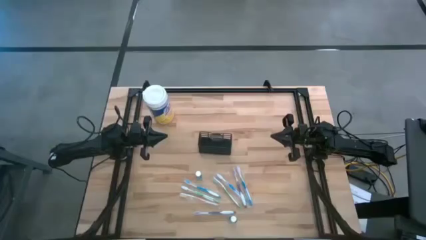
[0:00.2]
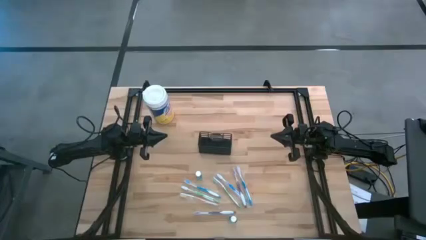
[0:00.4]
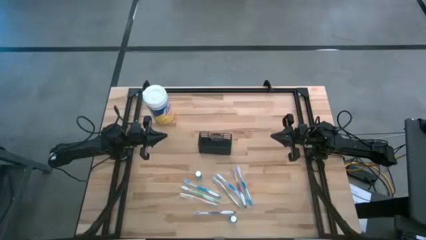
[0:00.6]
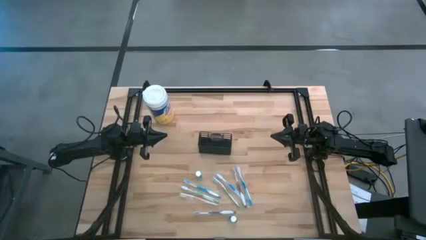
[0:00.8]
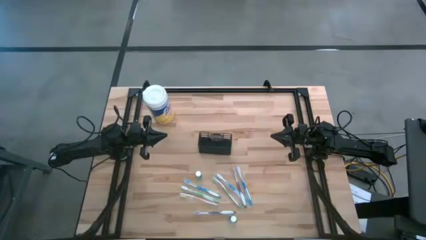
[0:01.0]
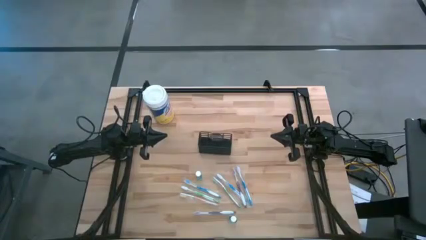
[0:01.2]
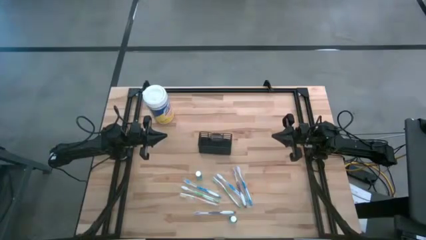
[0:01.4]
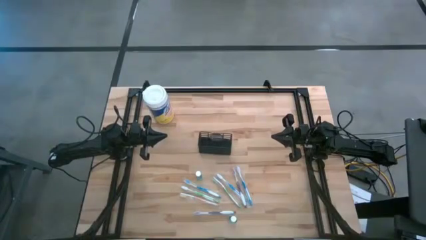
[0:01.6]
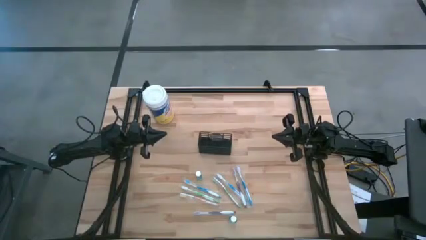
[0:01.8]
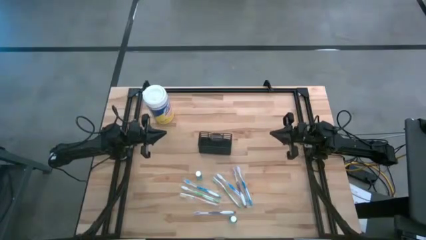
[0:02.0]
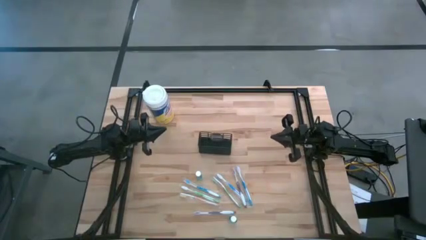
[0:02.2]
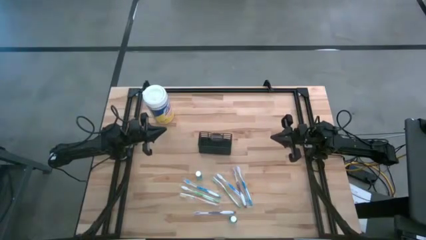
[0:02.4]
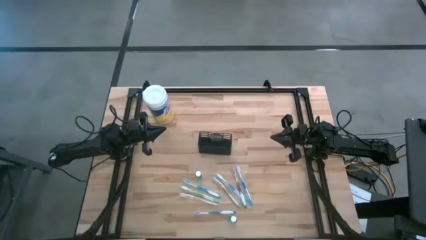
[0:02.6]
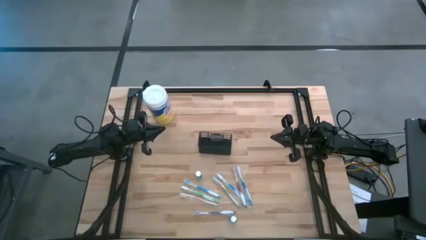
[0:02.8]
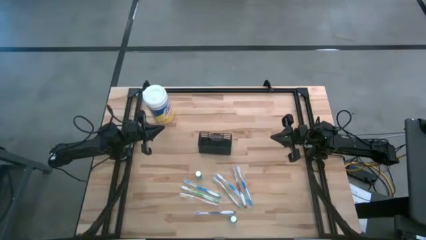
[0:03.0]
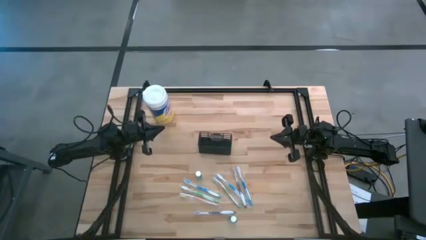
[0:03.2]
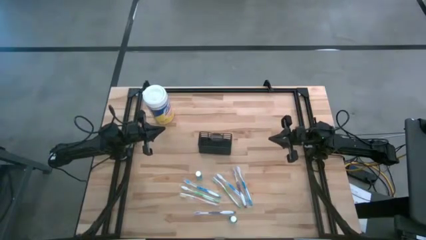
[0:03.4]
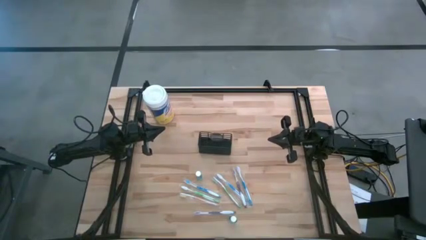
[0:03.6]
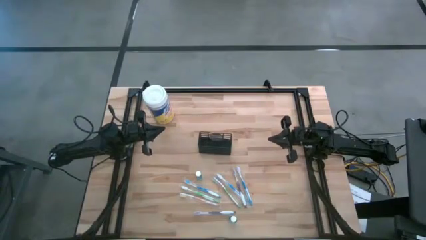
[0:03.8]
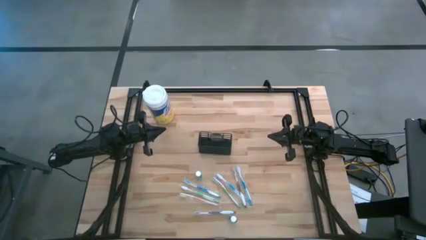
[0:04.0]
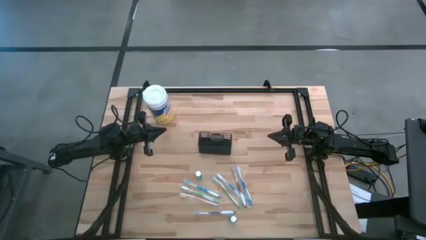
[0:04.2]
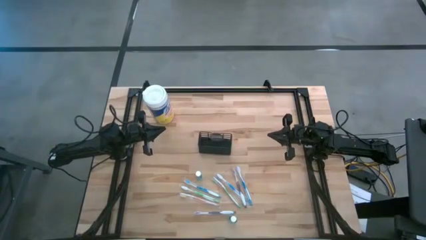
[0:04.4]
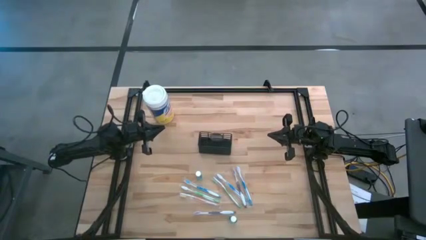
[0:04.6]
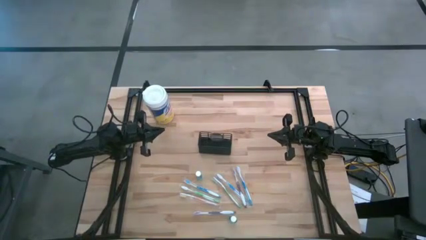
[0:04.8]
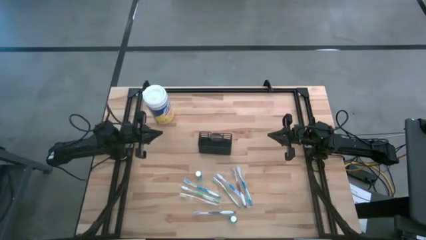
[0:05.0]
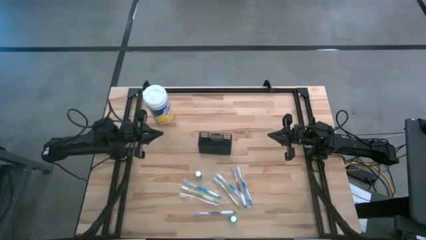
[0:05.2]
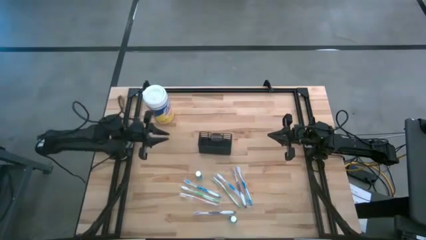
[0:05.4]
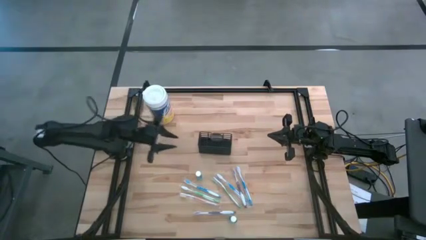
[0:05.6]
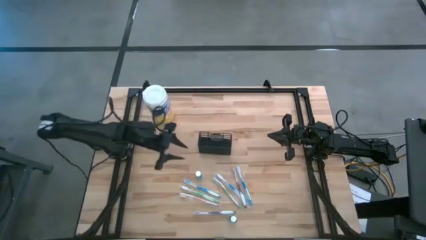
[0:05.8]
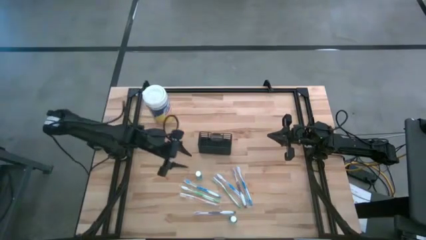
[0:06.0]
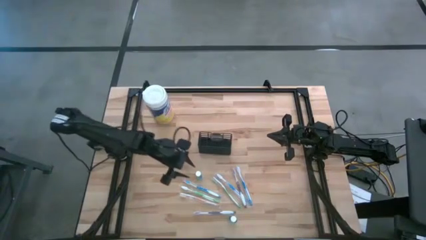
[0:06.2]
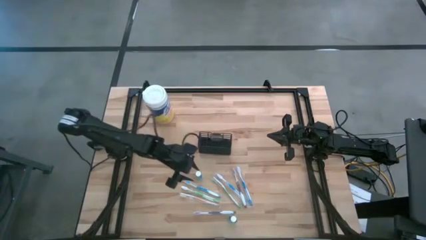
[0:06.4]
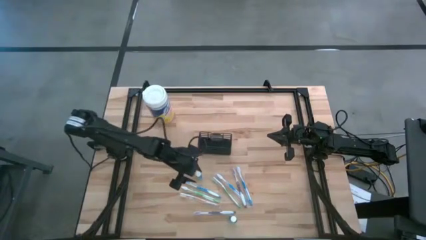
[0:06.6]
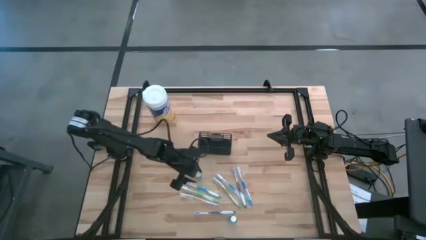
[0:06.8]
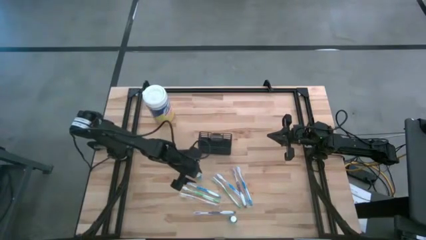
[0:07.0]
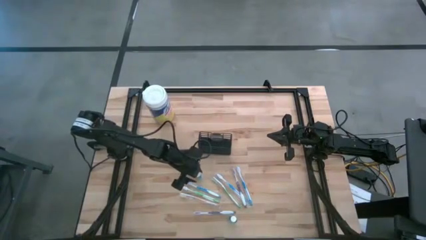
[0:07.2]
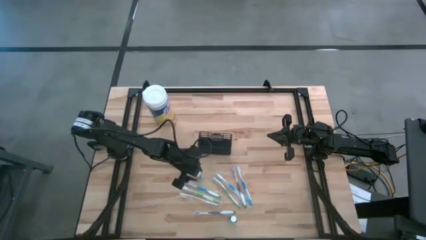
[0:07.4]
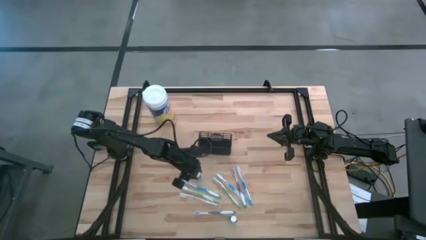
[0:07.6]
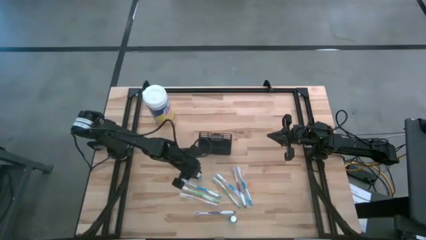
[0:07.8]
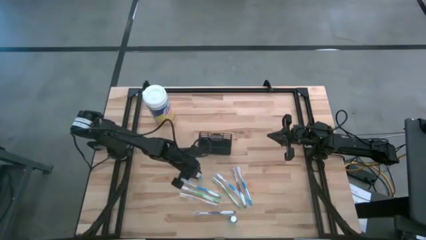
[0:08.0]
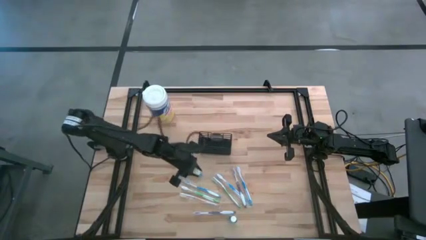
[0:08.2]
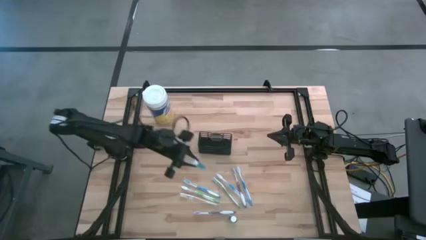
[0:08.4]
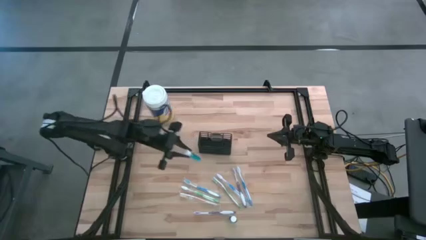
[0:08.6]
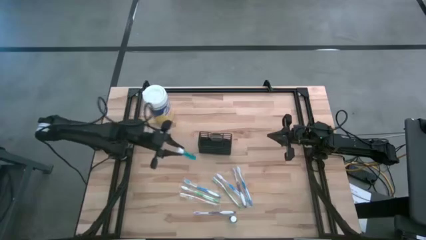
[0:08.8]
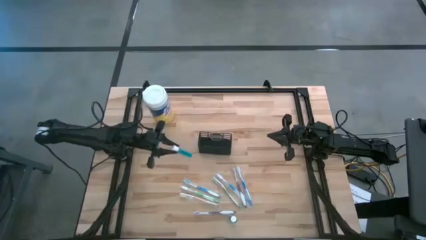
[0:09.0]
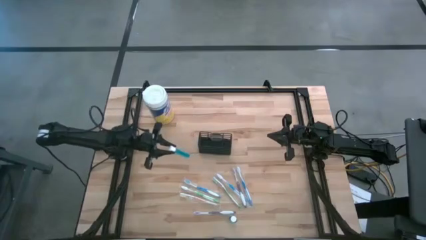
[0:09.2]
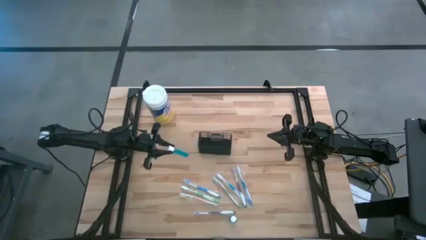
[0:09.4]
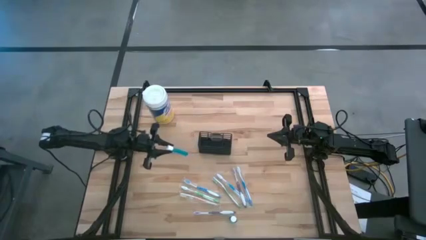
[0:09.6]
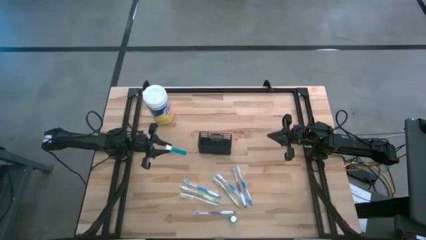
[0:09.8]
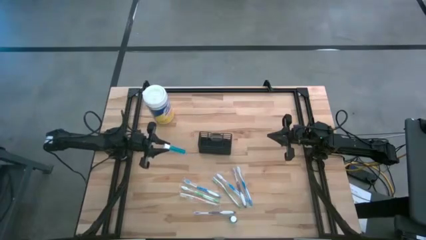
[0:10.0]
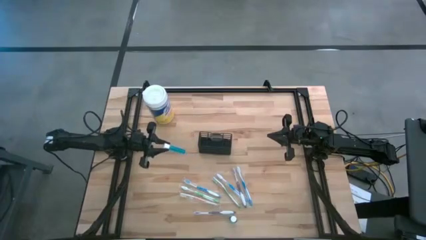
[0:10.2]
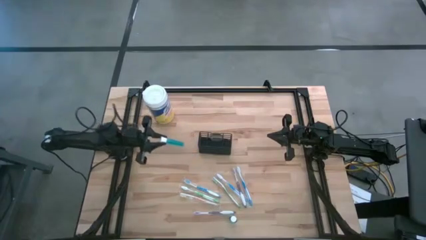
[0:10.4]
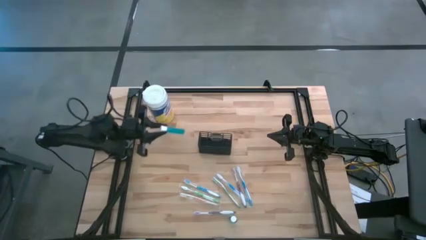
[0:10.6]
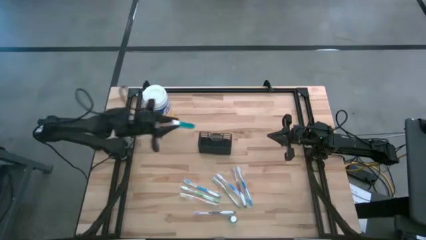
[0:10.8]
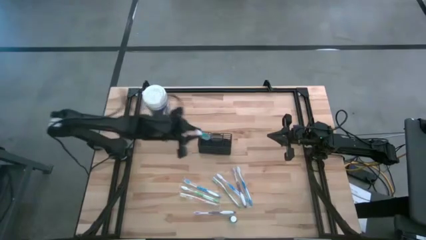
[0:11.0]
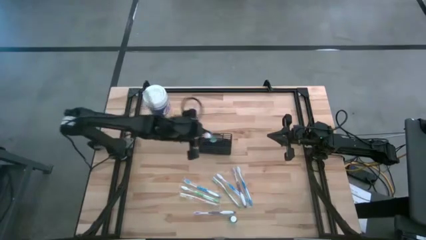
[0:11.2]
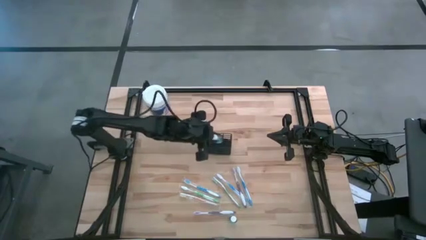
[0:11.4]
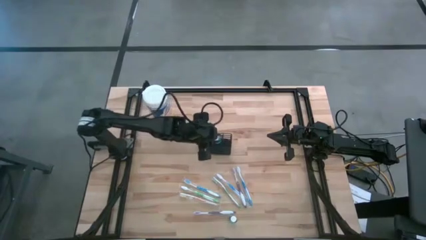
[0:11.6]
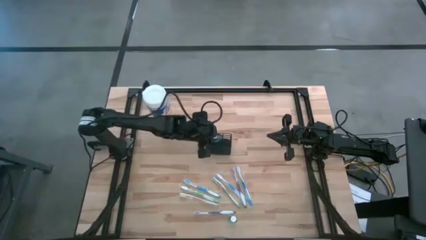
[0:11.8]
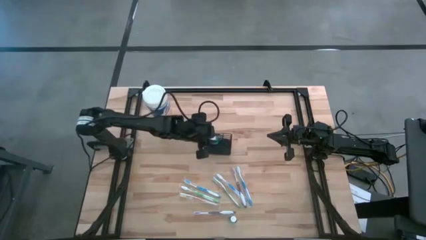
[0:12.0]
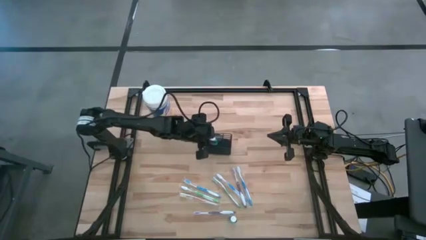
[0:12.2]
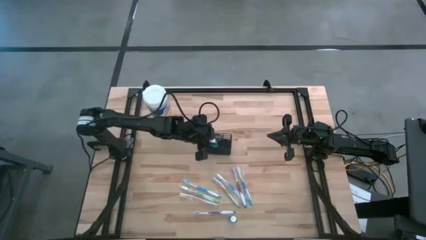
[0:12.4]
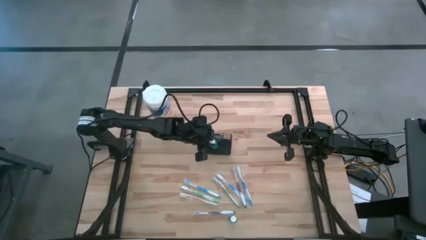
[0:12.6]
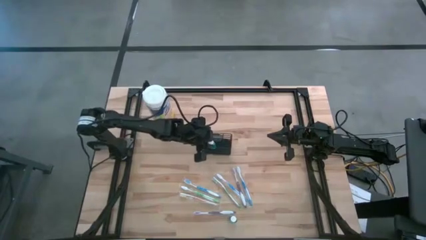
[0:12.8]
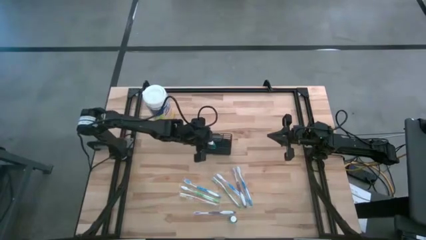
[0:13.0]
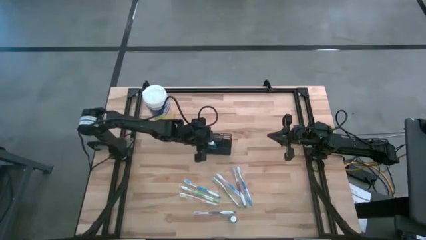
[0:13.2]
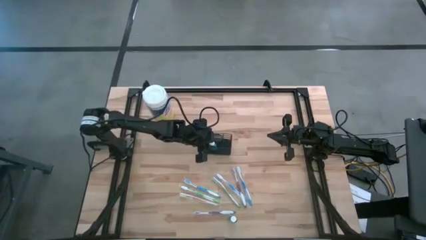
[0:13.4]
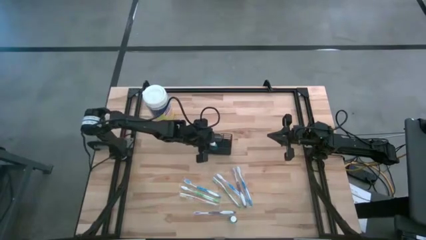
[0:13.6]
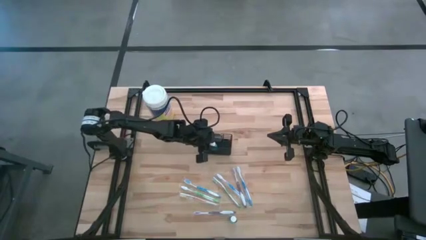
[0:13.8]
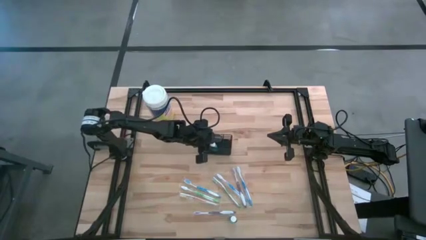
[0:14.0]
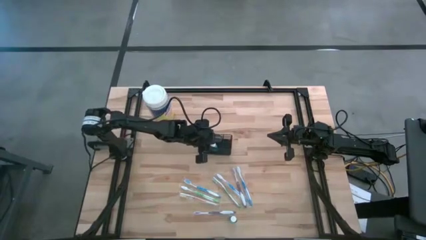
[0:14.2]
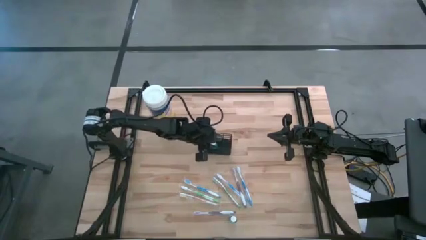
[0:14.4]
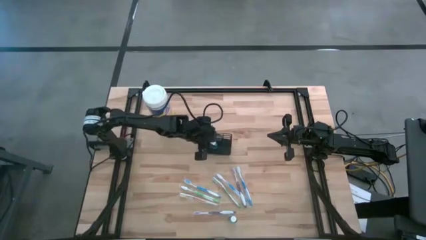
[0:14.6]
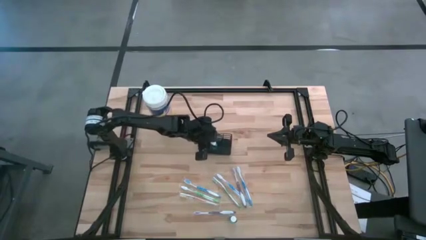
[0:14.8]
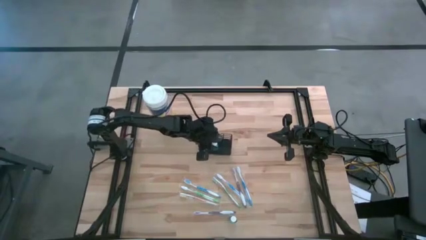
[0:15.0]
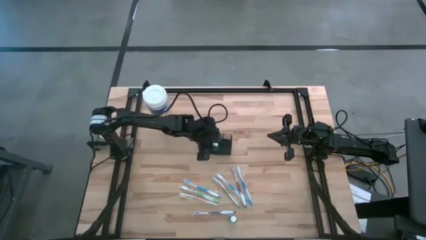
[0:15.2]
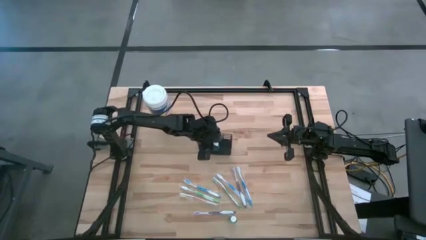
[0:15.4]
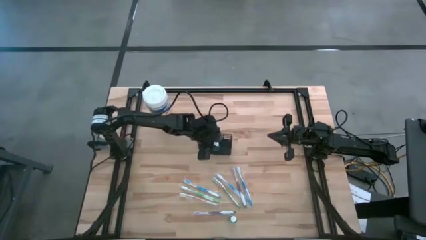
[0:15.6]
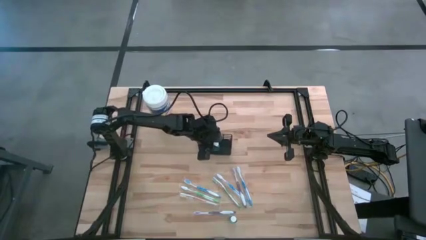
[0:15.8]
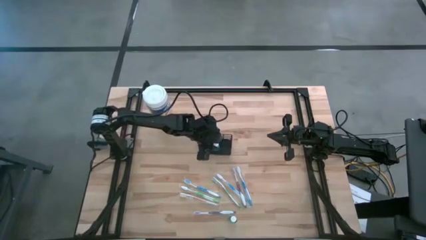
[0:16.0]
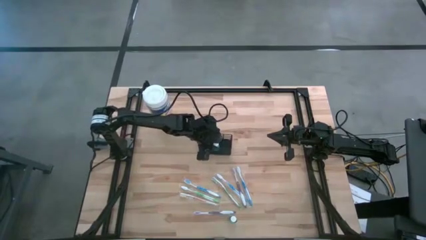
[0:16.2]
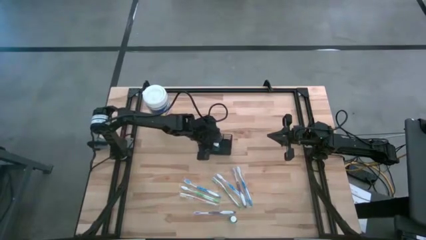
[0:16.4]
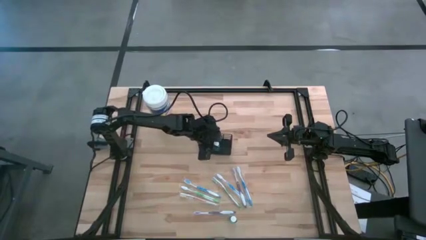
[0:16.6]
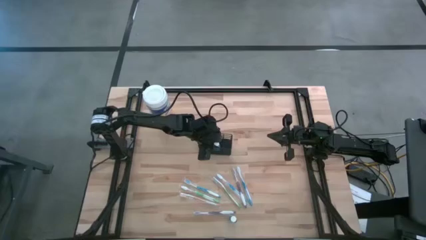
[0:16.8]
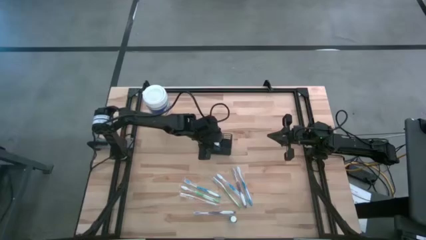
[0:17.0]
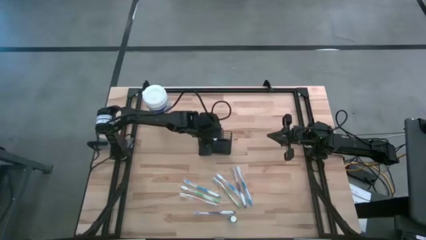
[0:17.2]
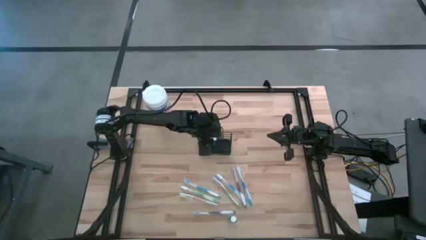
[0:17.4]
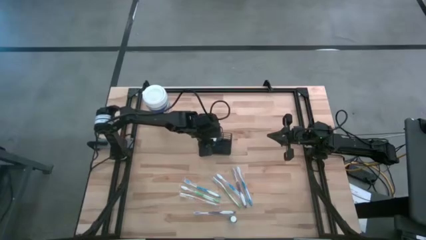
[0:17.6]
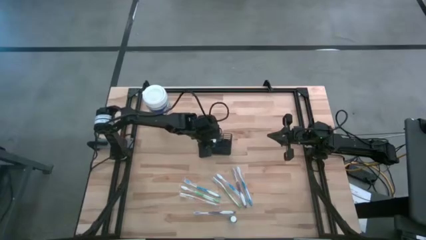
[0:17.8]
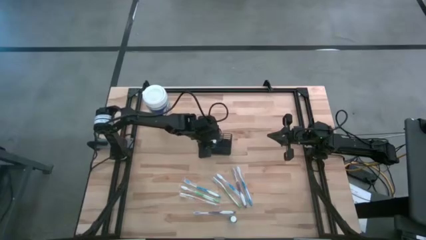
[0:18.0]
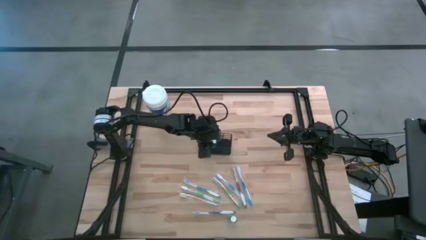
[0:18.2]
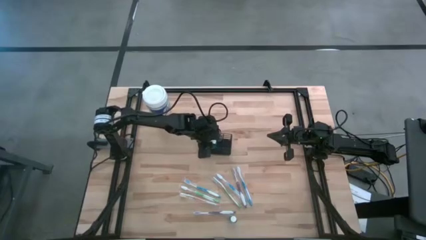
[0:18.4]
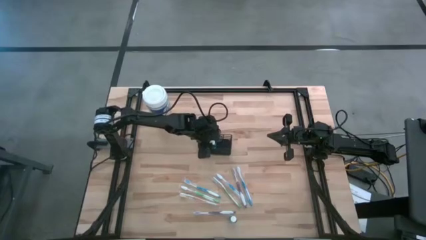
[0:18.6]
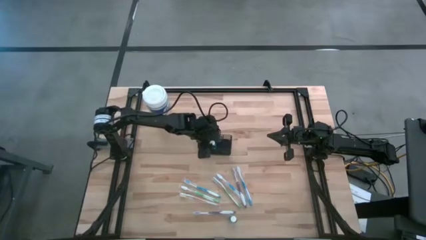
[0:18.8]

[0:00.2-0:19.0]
Task: Pick & Place toothbrushing station
Put the top mouthwash into the mesh organizer
